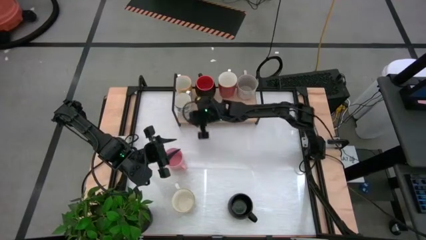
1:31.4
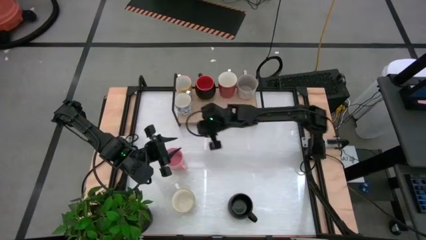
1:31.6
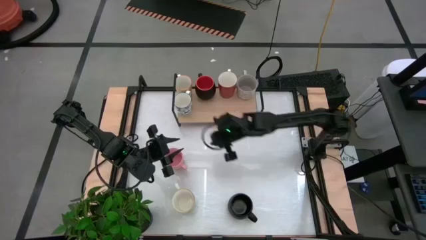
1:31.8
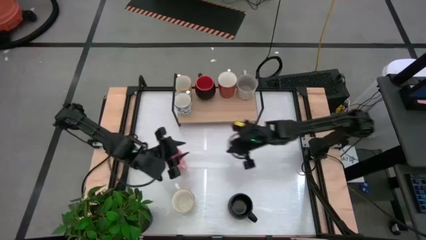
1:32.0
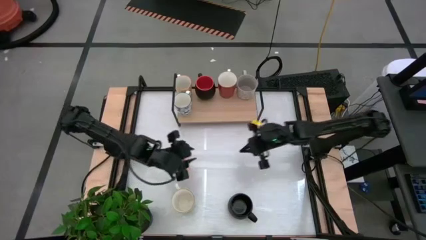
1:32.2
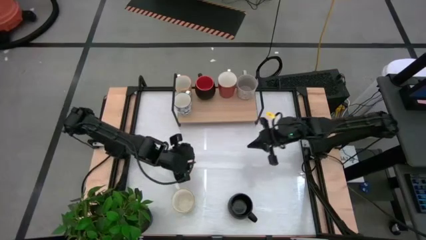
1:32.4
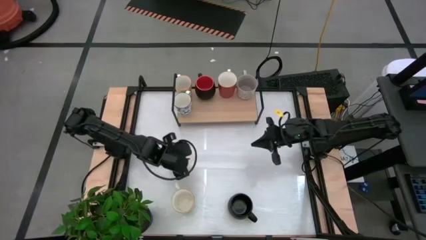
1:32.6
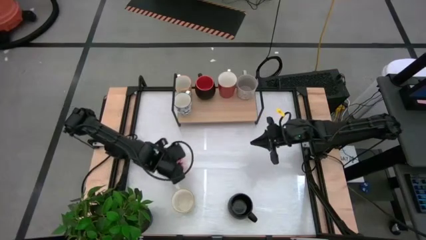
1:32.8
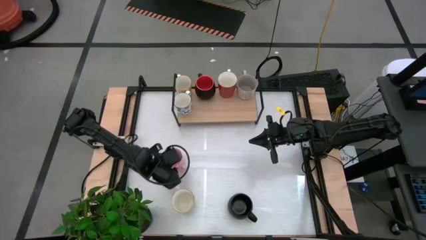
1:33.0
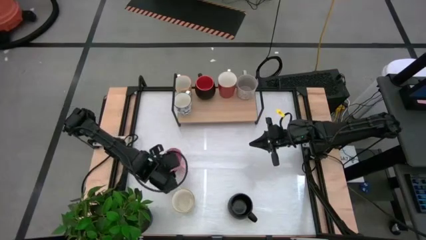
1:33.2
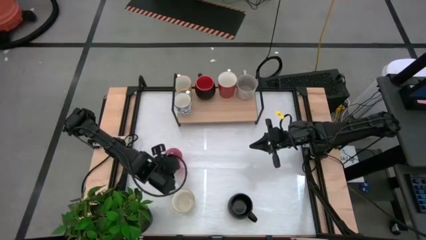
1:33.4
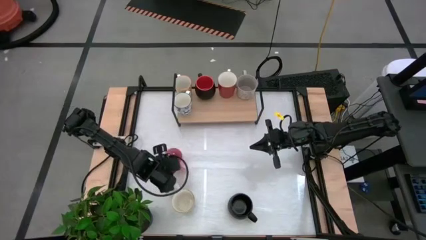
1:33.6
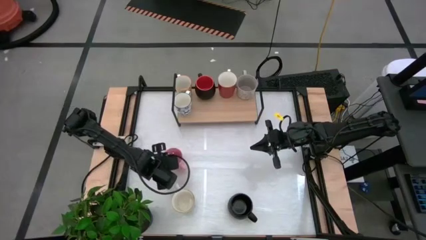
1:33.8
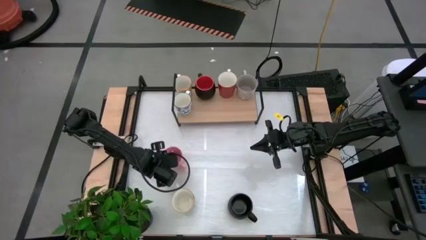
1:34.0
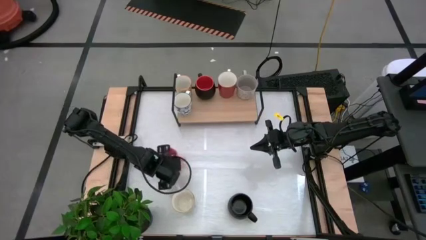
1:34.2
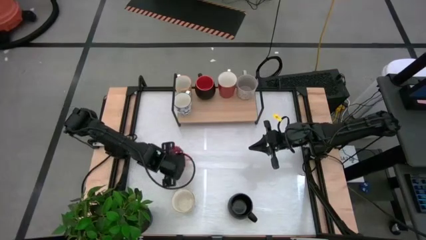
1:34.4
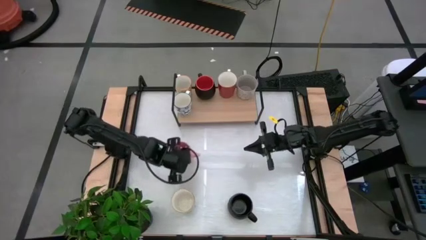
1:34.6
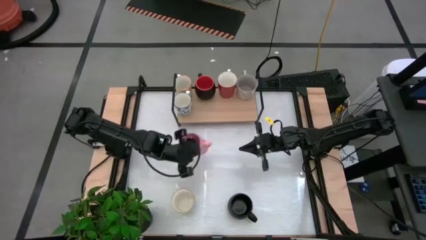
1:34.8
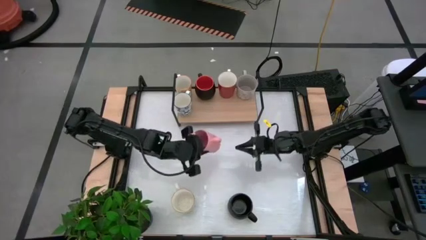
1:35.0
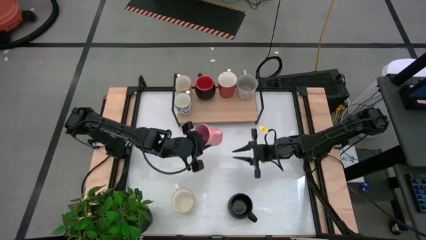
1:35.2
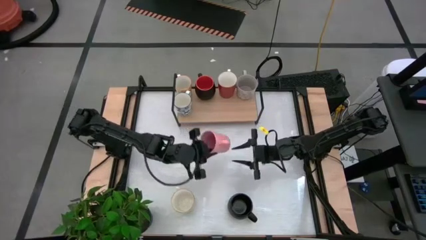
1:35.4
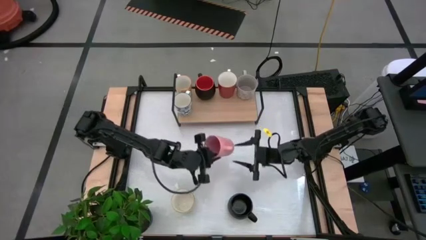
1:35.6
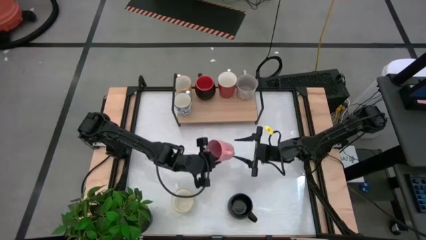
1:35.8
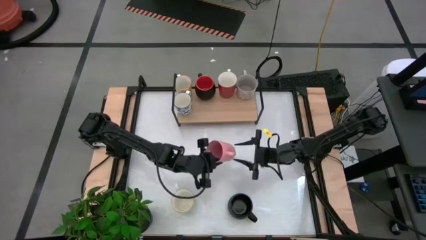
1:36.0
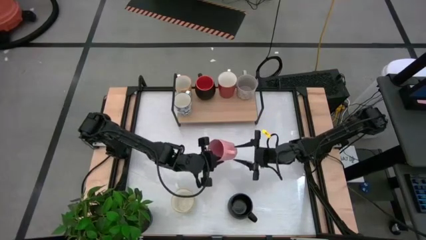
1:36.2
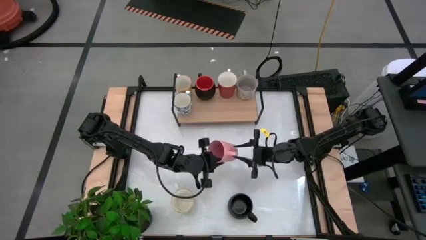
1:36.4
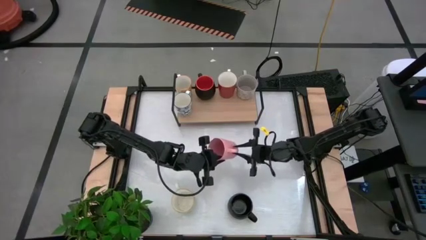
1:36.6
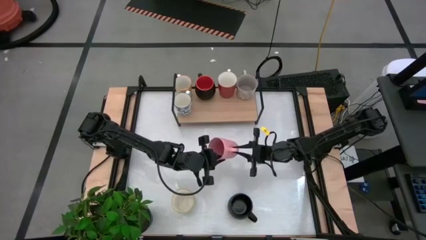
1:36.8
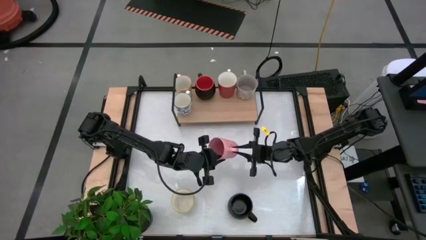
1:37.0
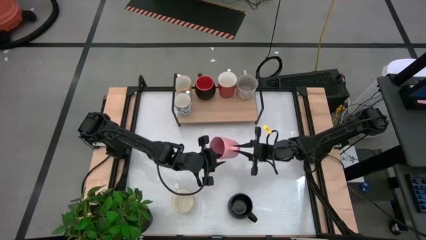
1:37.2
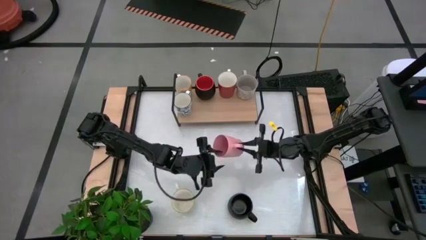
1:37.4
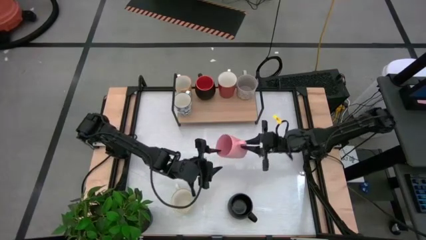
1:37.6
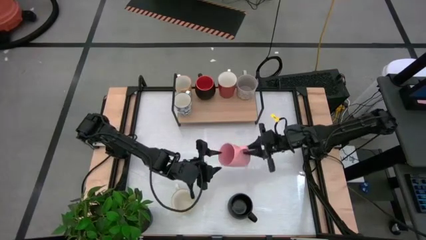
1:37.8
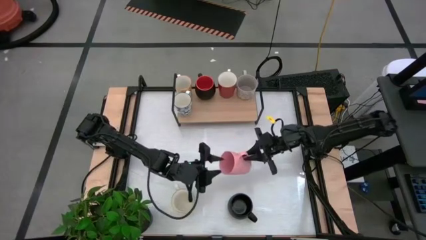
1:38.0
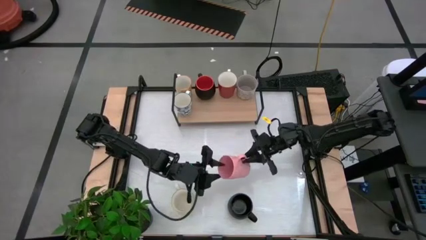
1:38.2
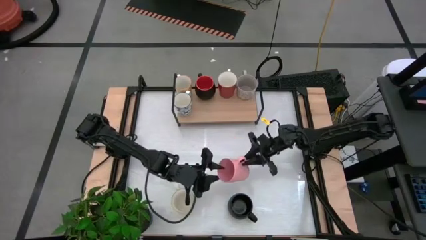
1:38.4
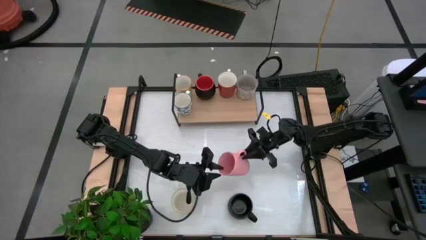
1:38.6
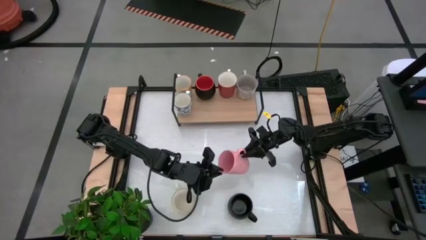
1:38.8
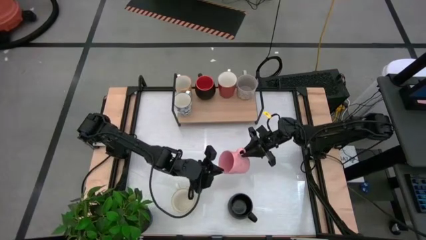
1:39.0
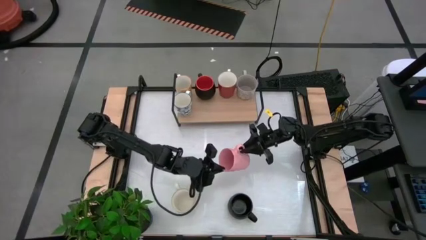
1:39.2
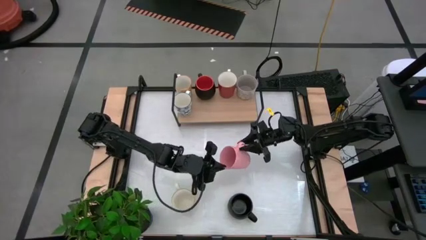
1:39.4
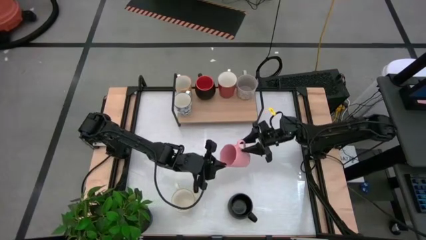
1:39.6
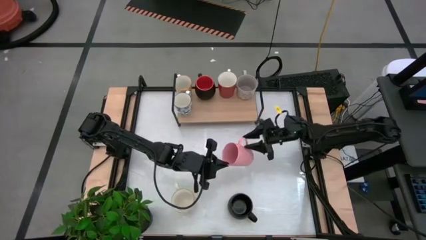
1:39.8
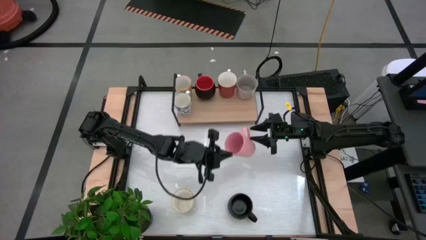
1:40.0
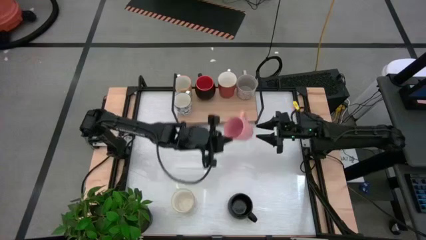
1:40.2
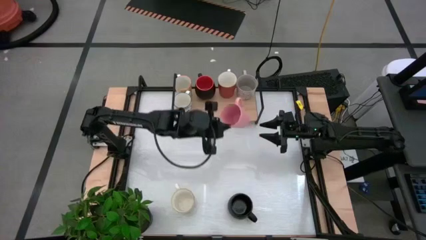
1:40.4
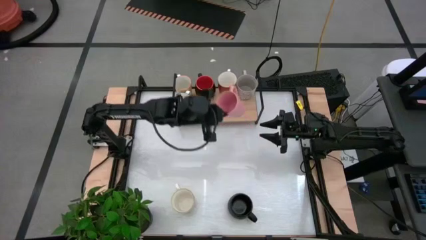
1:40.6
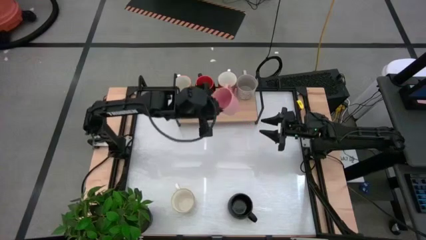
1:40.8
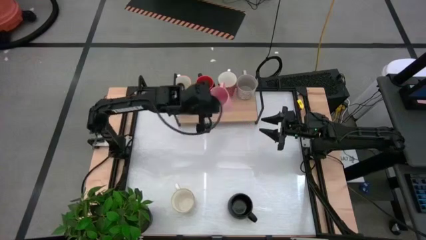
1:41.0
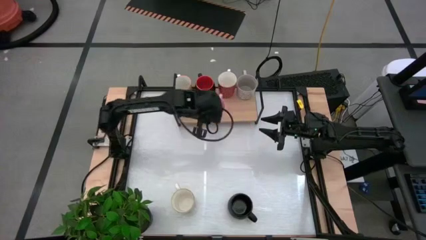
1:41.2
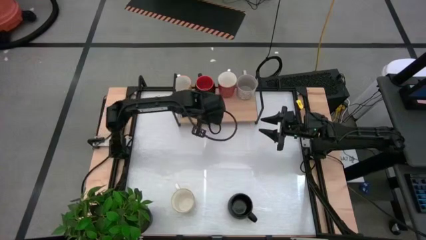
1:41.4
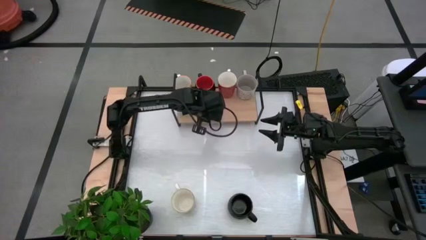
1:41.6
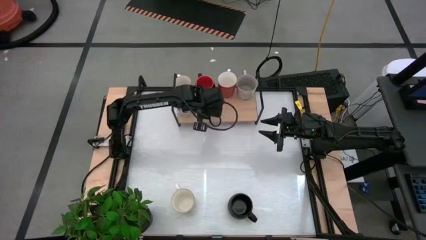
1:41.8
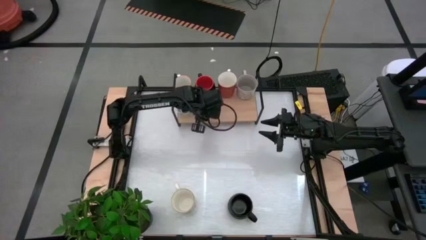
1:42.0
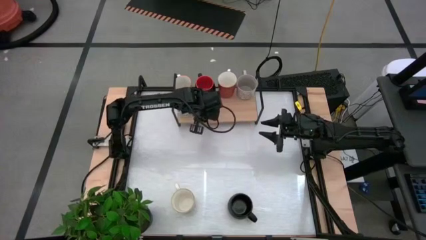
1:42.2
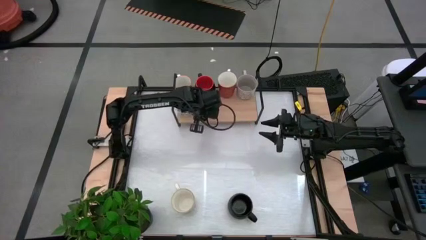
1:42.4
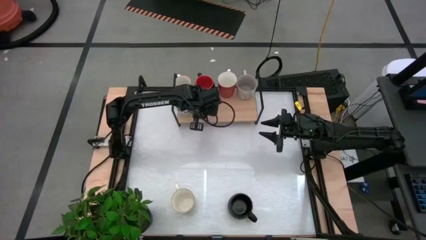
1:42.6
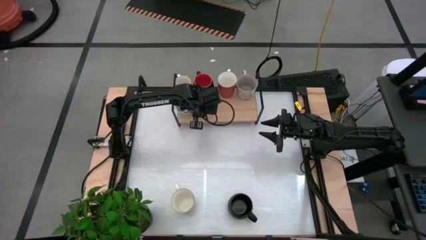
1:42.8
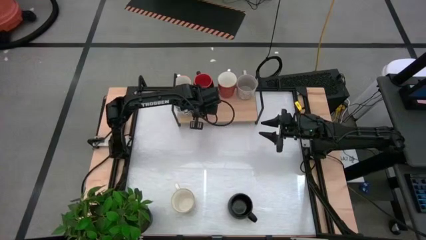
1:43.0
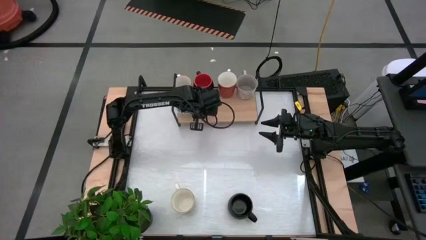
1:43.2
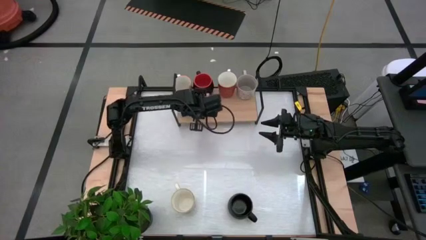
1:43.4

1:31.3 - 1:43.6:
Task: Place coffee mugs
Put the pink mug on the shelf

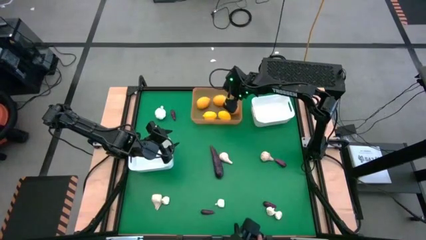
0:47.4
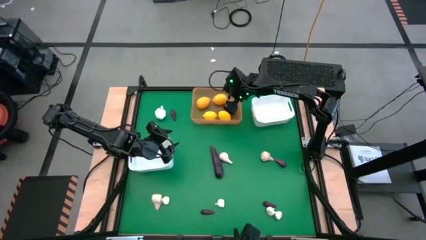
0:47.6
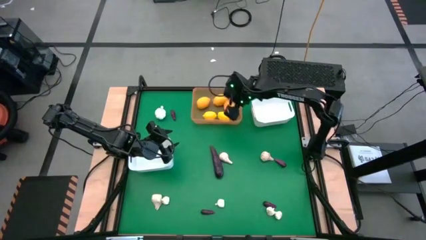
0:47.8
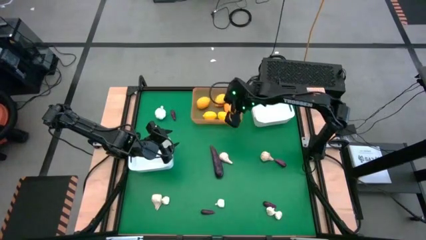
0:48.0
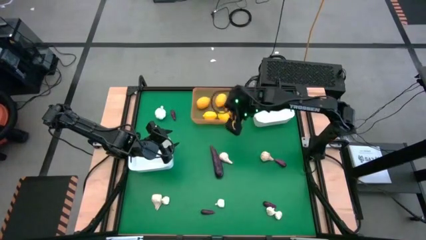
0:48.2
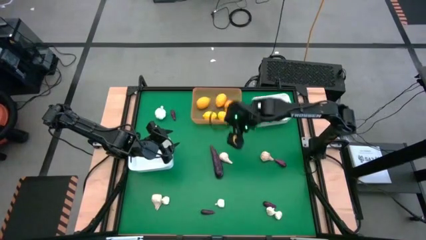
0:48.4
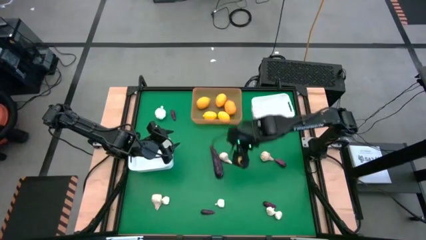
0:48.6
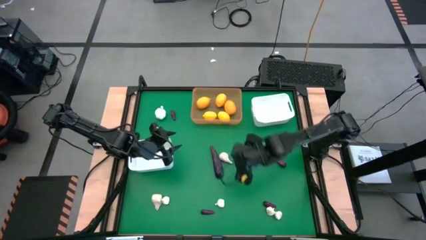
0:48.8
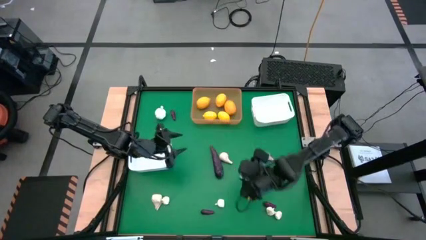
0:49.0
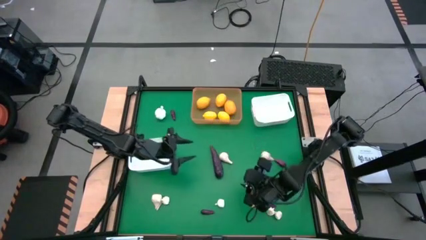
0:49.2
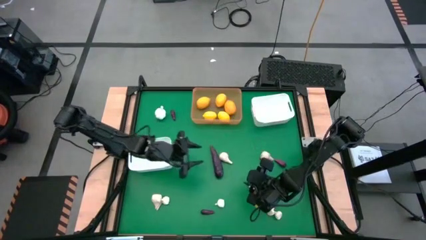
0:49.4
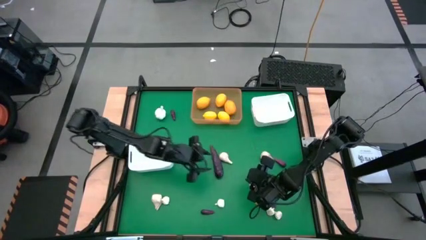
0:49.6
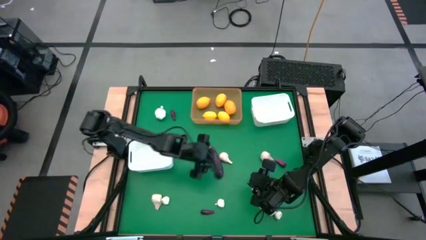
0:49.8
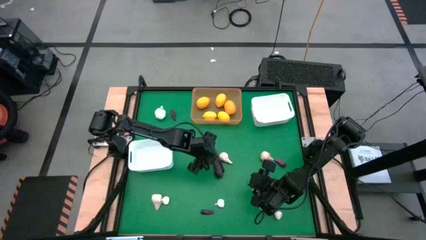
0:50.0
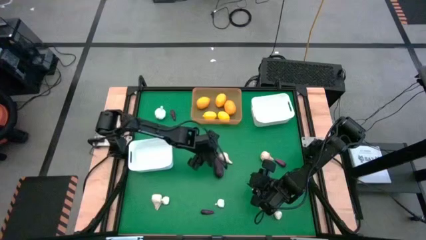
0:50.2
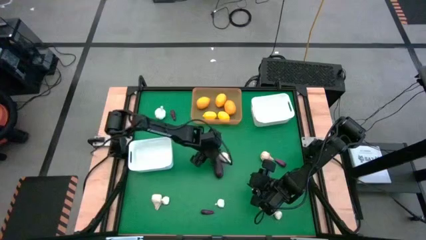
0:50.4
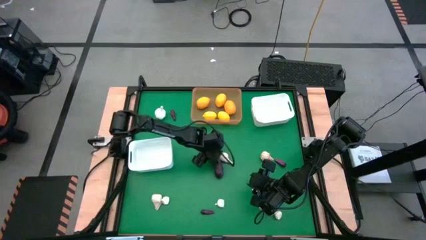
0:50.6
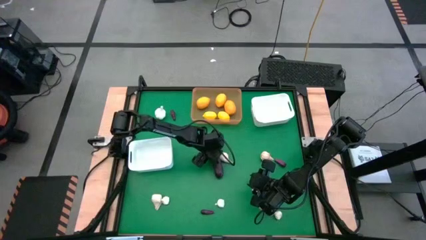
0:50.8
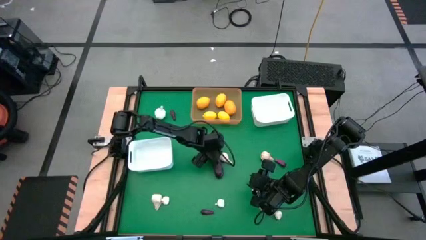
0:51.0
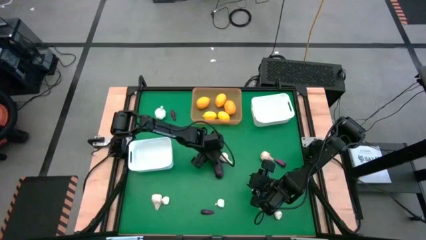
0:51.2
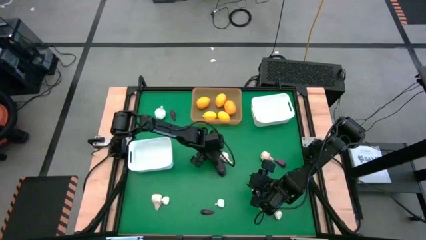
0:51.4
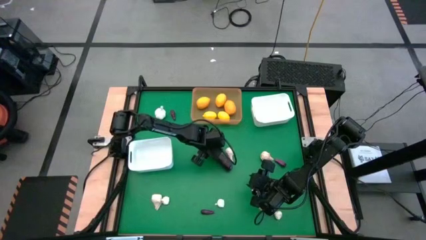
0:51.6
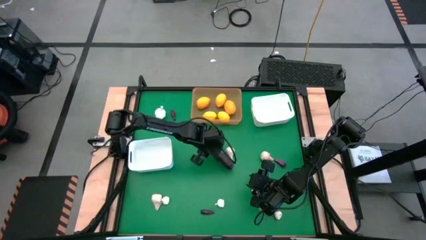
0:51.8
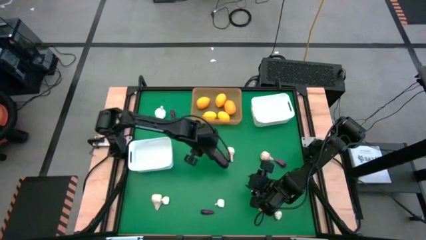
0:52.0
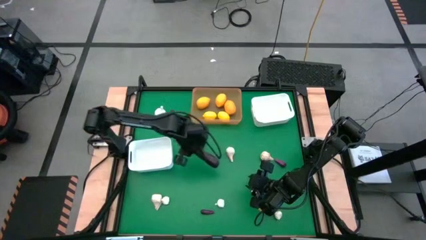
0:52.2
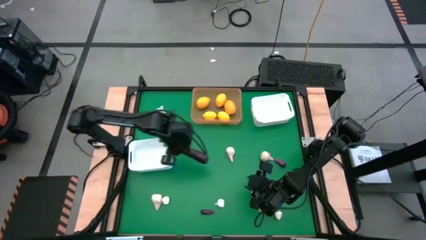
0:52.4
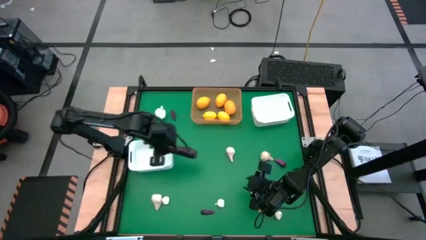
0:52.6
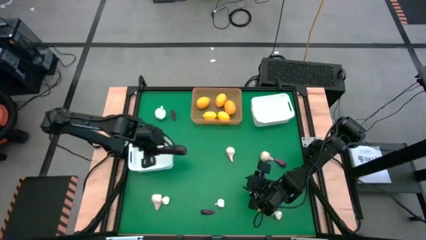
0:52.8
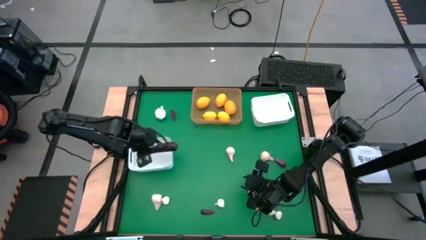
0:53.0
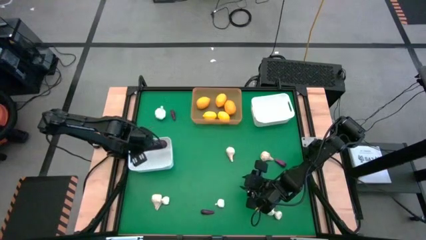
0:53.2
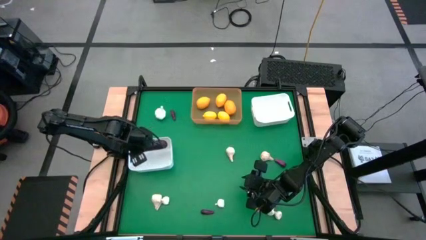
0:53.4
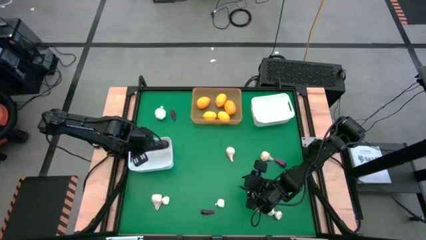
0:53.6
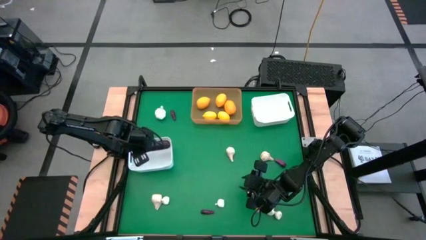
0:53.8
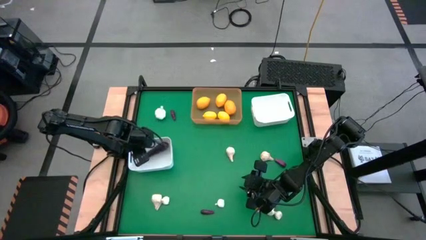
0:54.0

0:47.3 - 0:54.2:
Task: Sort produce into baskets
Put the eggplant into the left white bin
